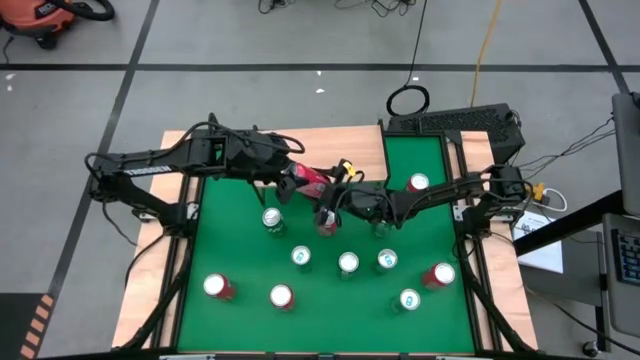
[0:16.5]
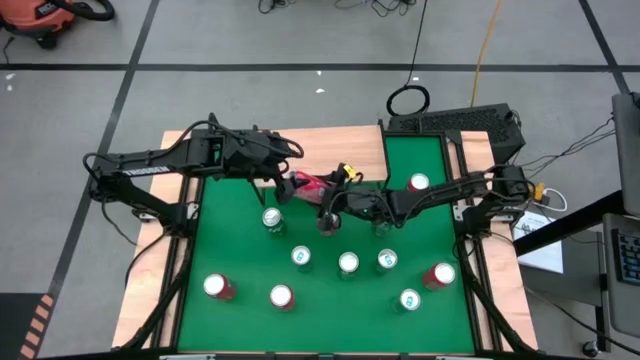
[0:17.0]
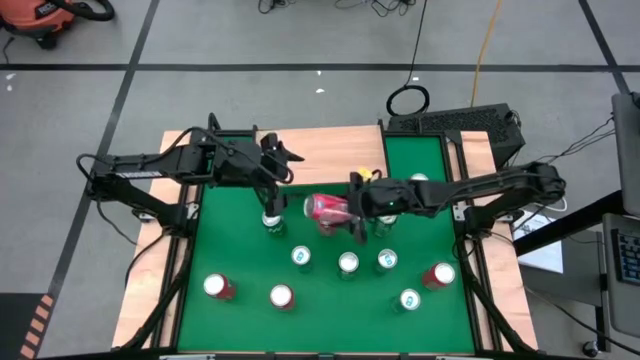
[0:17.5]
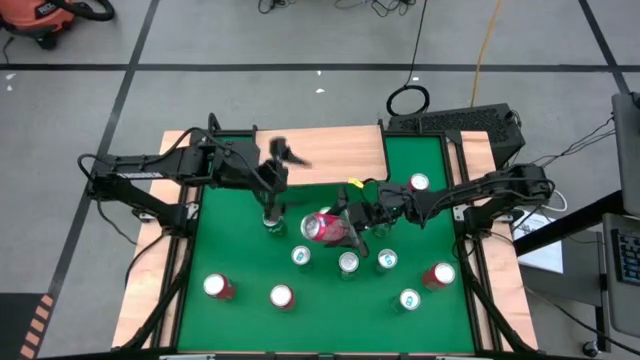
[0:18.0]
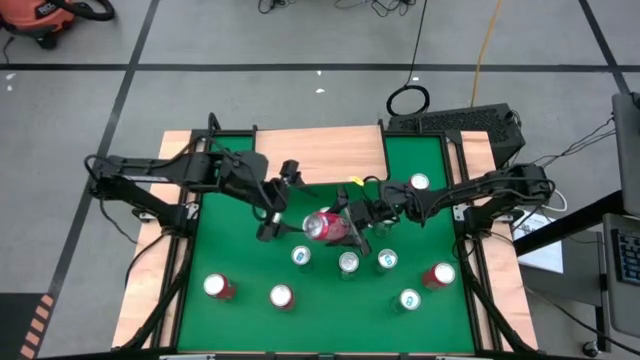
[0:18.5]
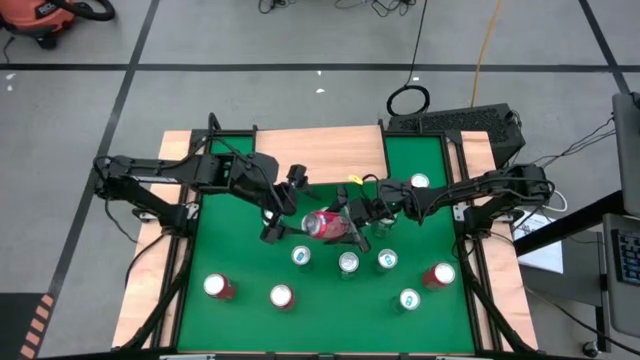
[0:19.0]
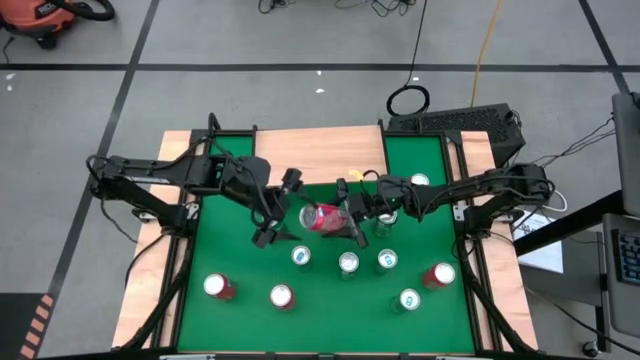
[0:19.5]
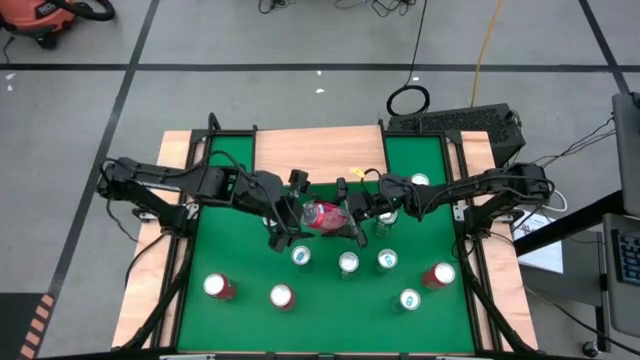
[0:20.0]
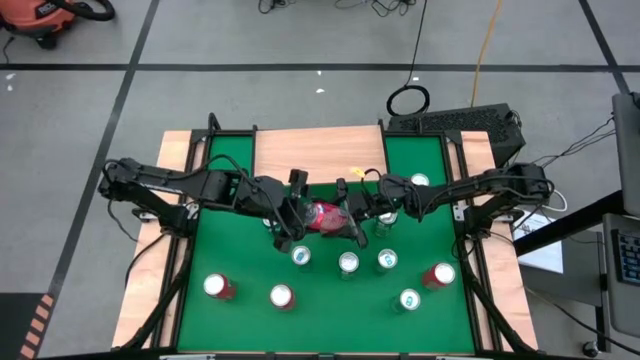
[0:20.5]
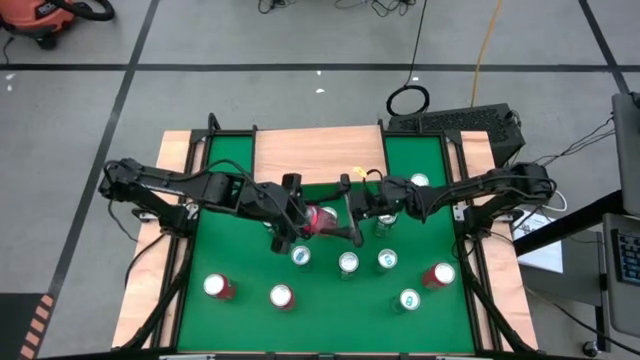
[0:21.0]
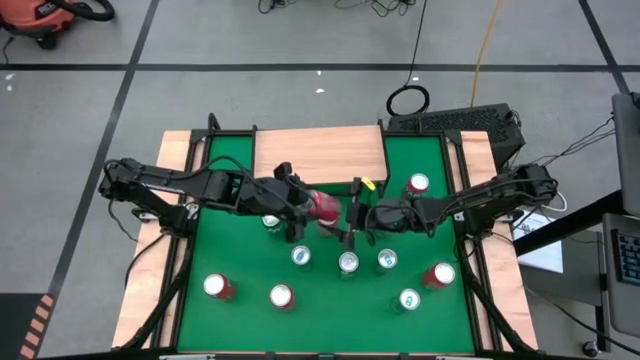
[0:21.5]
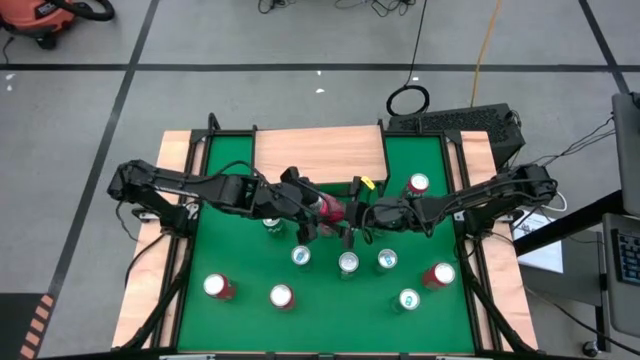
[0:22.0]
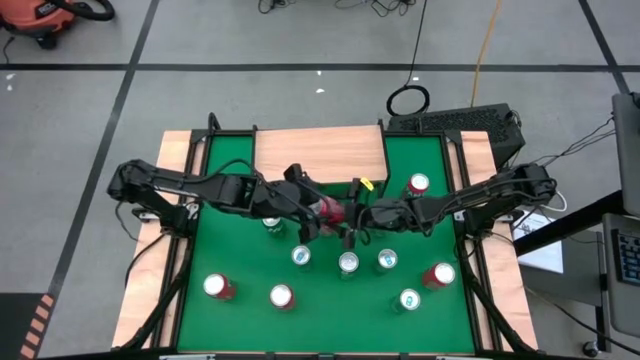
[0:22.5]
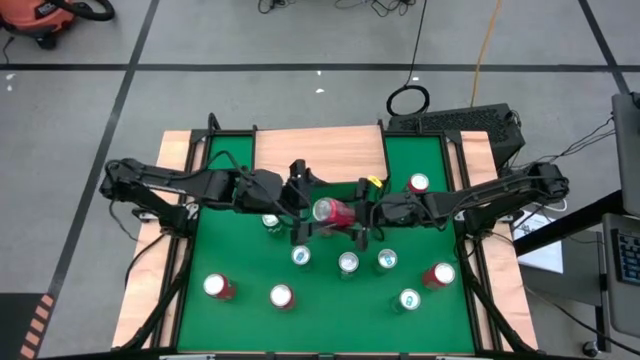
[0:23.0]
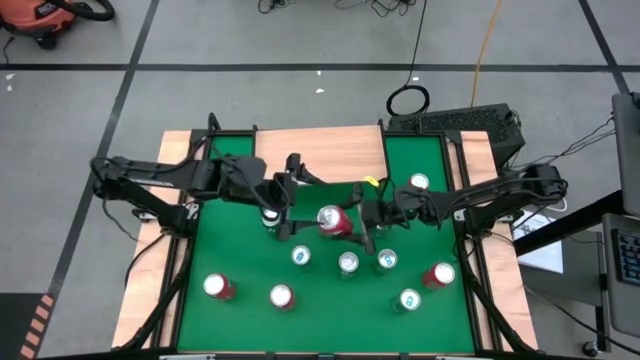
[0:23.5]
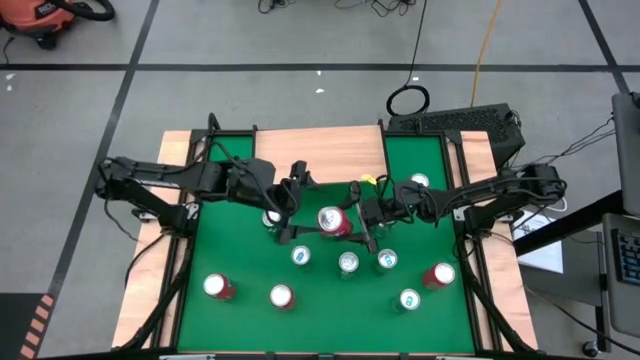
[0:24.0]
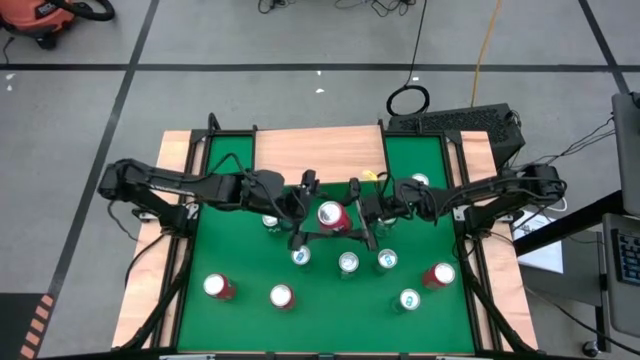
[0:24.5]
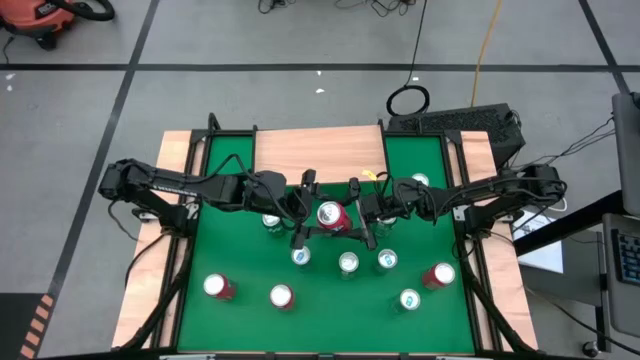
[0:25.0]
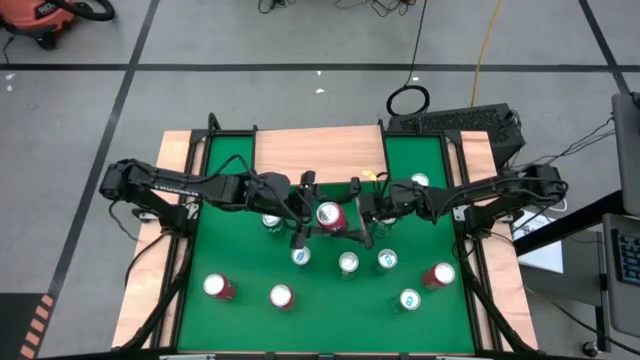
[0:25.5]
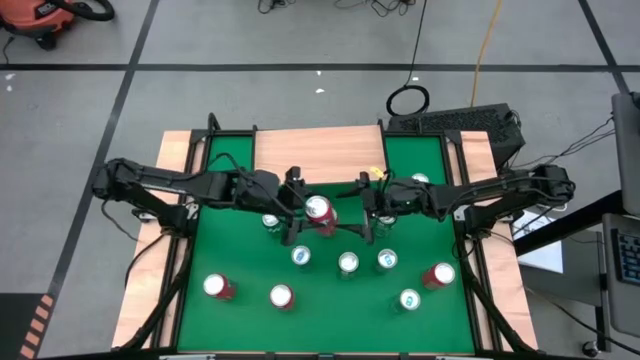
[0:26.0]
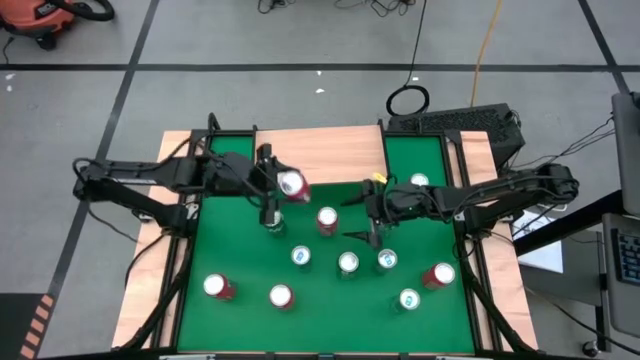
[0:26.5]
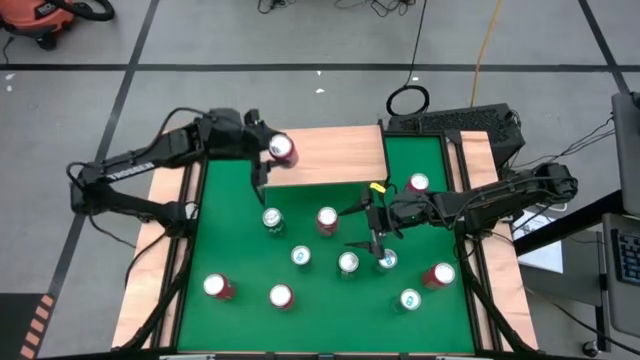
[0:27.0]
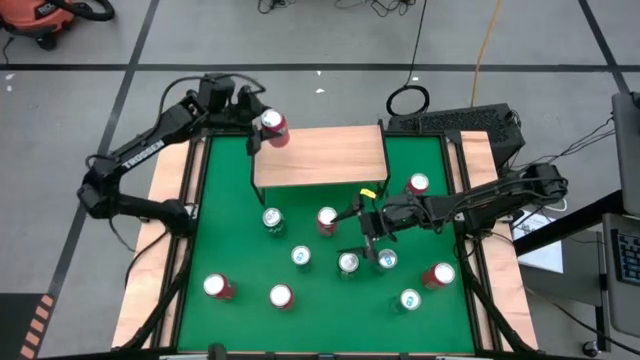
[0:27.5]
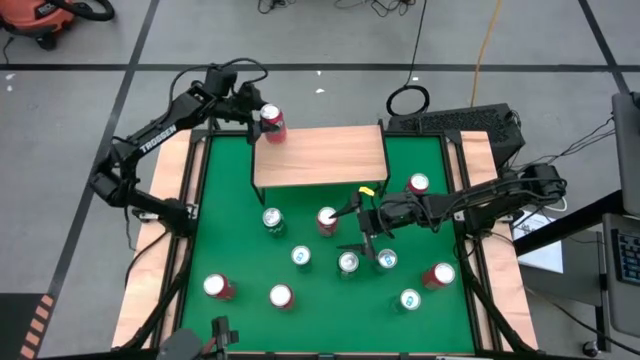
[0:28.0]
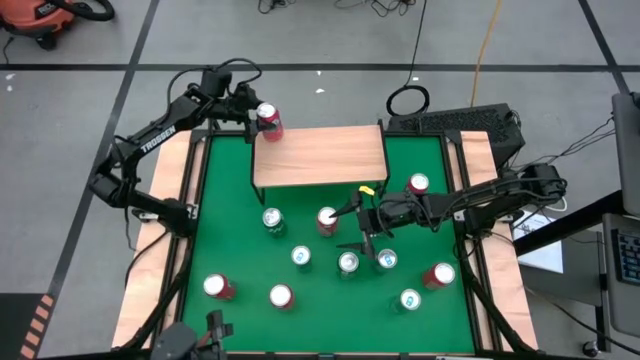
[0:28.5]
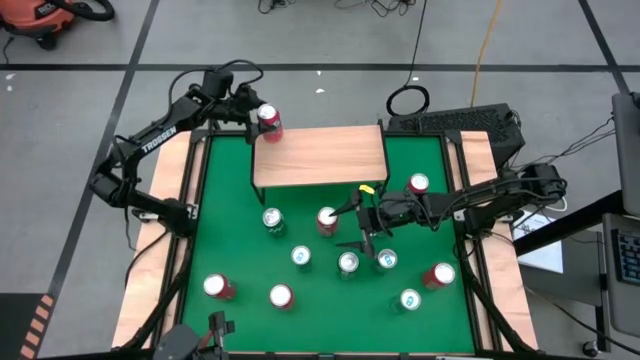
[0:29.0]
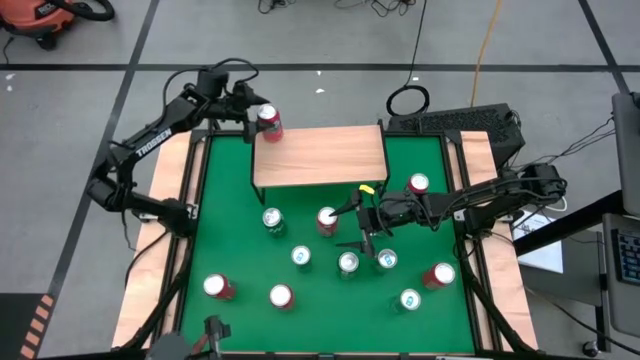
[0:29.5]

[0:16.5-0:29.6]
Task: Place canned beverage on shelf
Put the red soda can on the shelf

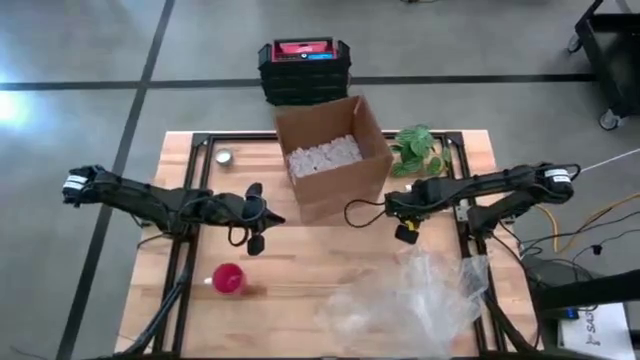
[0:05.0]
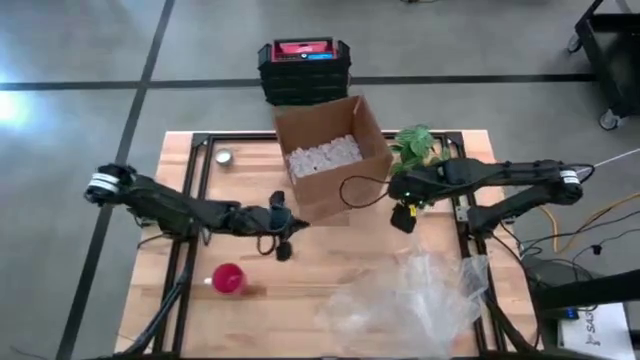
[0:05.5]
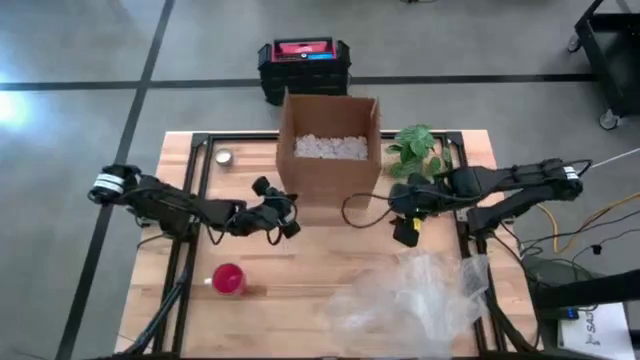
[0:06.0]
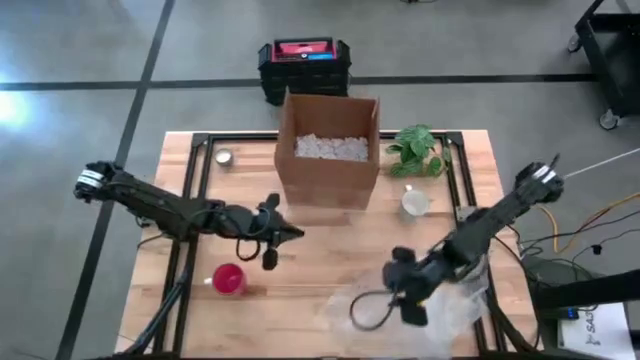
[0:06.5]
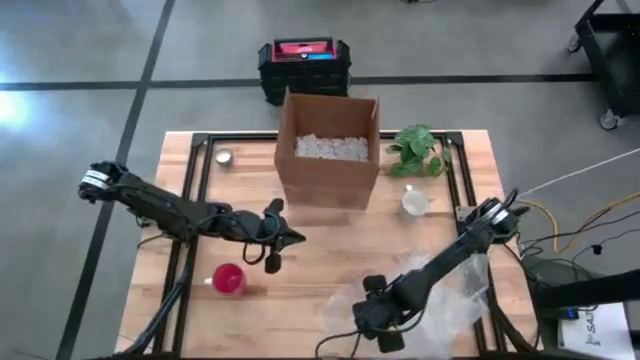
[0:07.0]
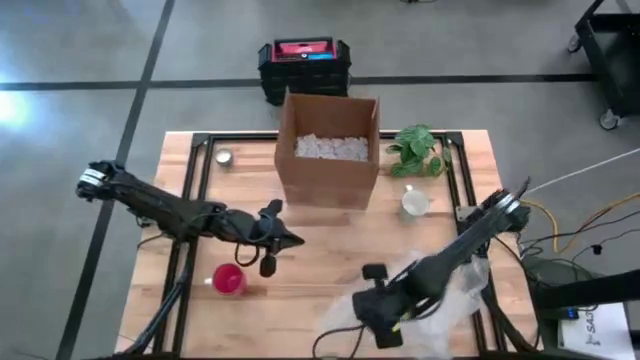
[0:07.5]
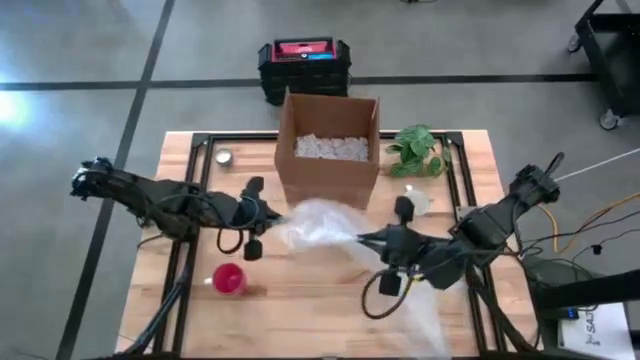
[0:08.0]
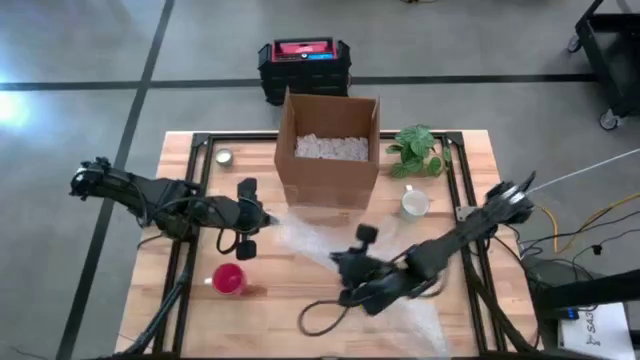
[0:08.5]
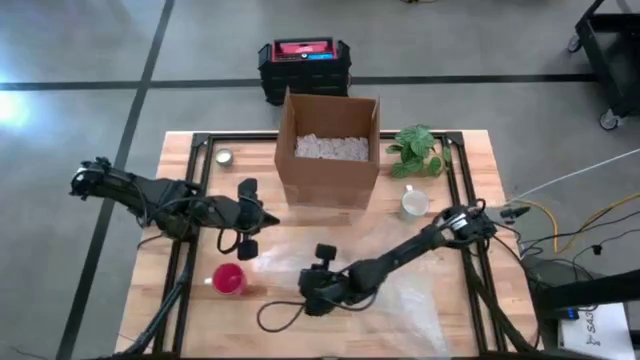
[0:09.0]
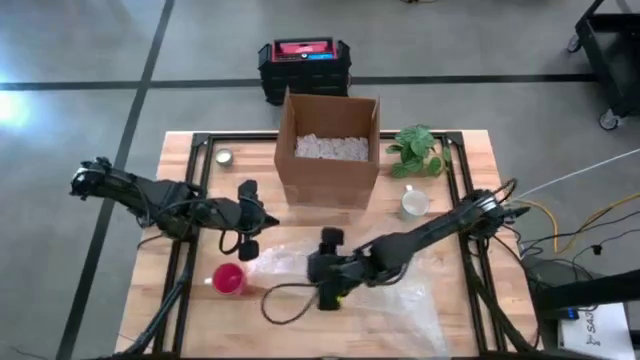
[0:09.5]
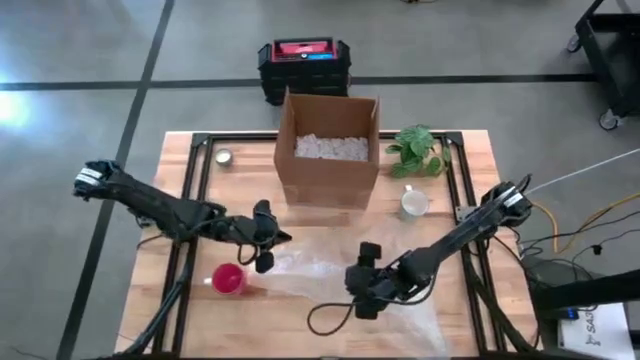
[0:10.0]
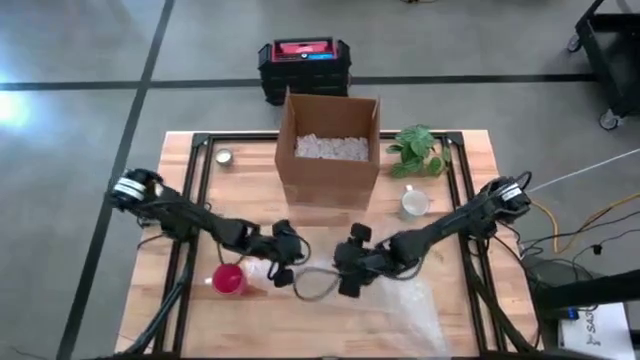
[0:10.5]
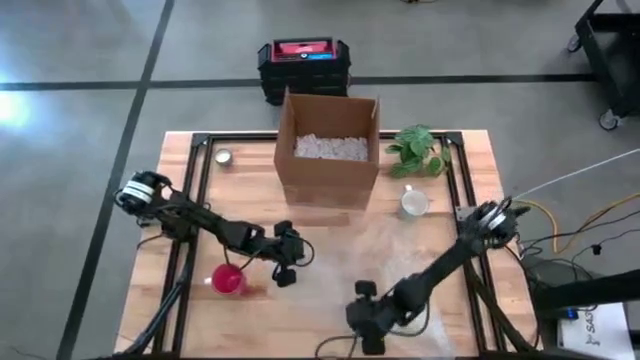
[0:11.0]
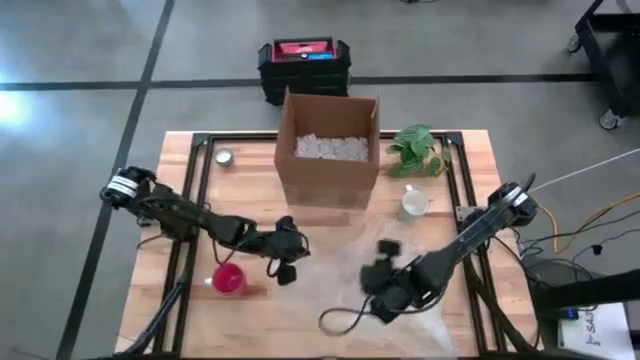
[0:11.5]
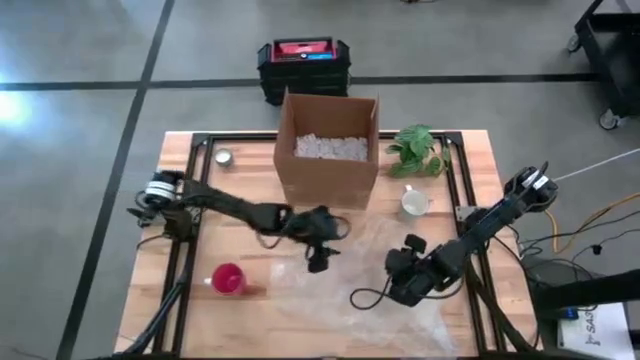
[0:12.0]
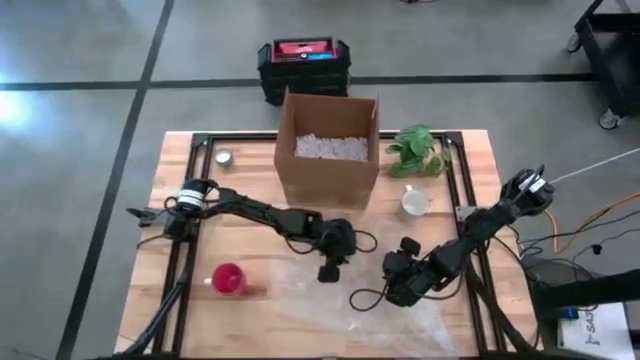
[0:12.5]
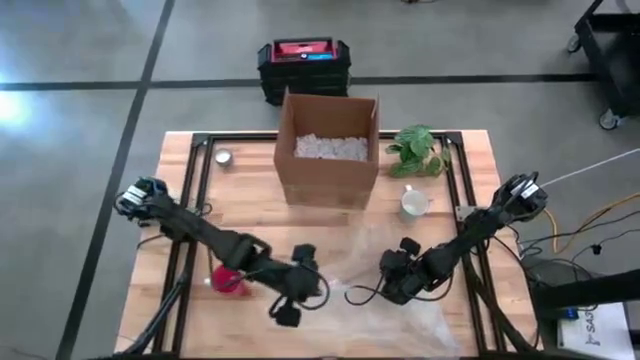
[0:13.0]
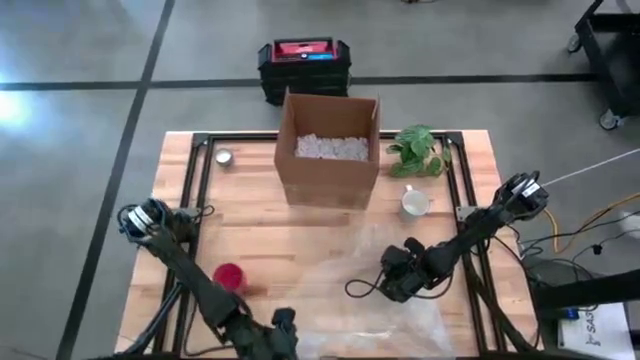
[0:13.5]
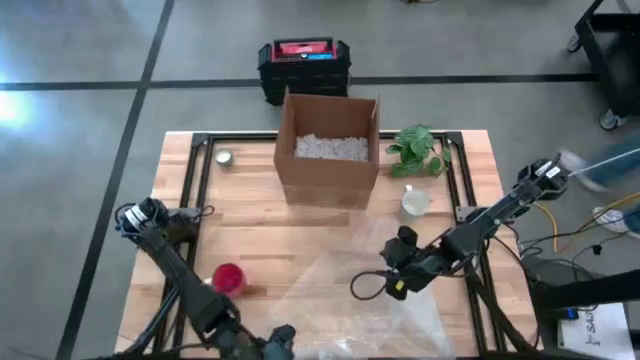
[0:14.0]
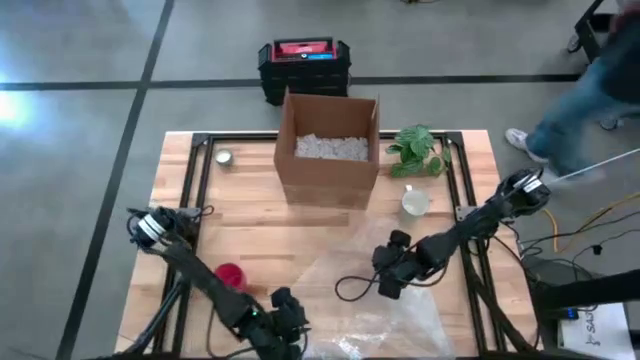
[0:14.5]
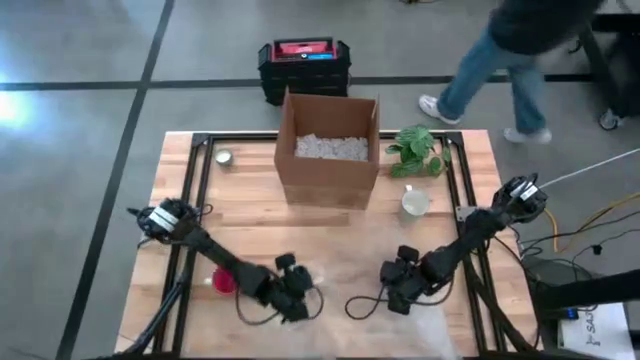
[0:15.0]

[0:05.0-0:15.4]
Task: wrap mug
Prepare the bubble wrap
